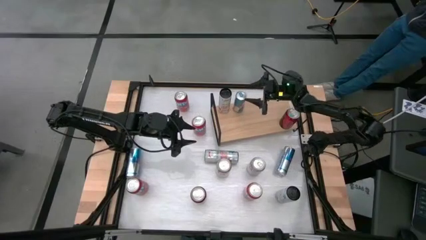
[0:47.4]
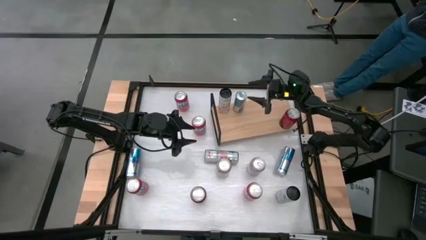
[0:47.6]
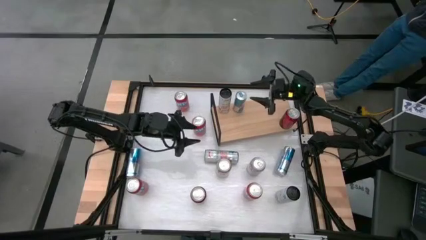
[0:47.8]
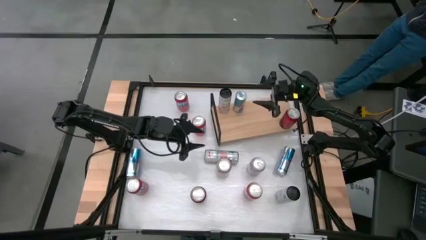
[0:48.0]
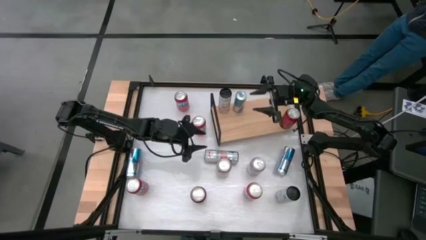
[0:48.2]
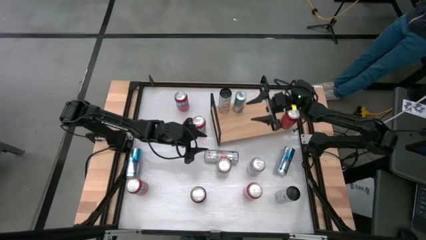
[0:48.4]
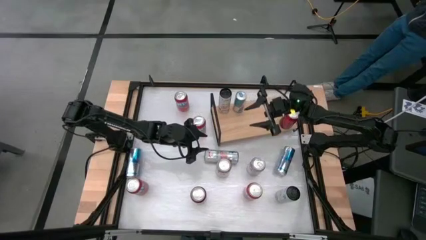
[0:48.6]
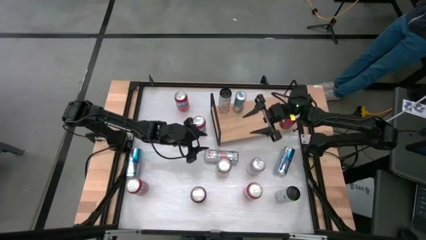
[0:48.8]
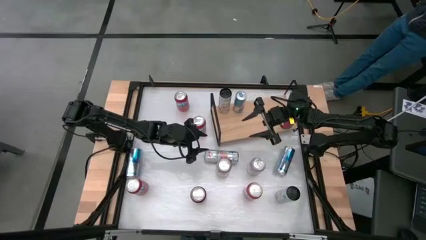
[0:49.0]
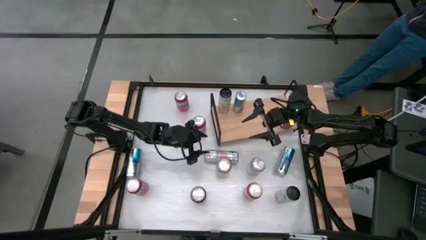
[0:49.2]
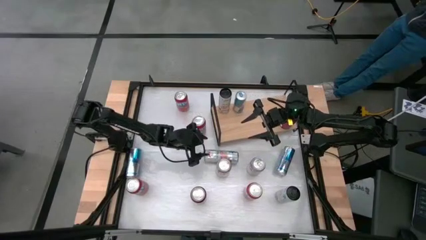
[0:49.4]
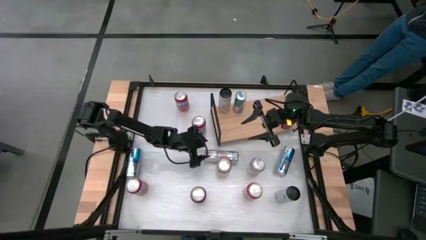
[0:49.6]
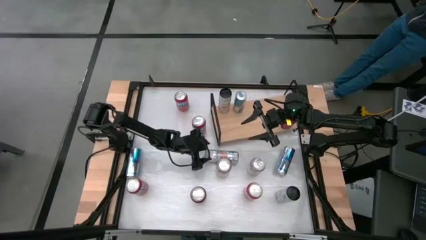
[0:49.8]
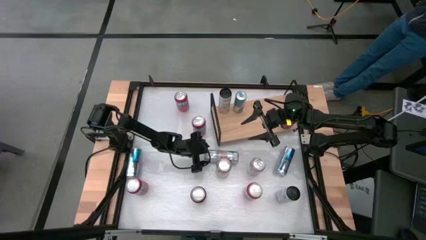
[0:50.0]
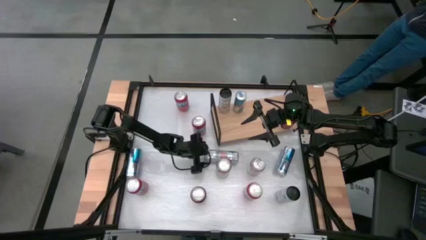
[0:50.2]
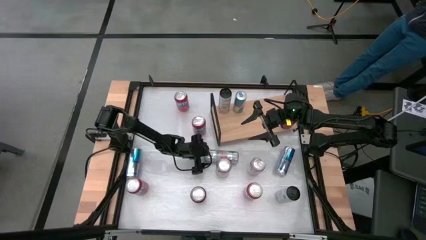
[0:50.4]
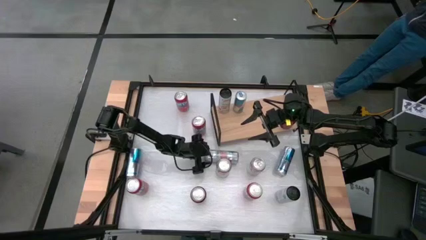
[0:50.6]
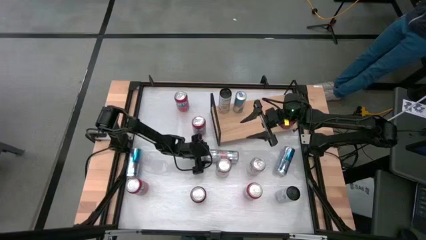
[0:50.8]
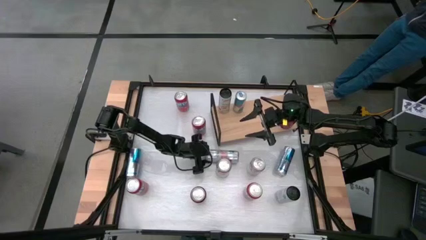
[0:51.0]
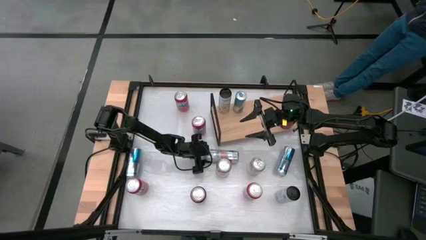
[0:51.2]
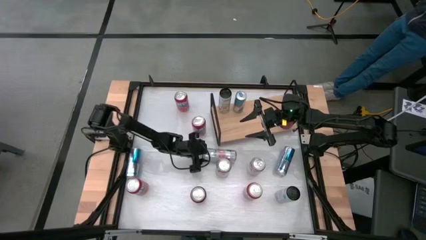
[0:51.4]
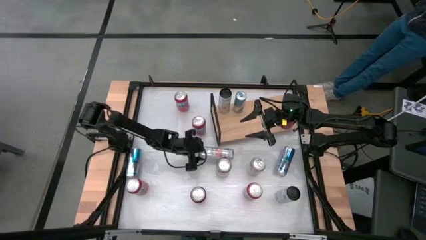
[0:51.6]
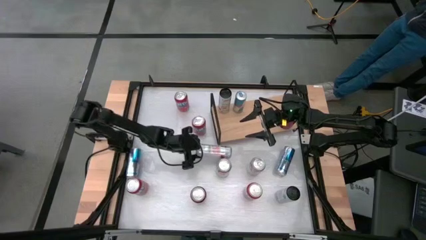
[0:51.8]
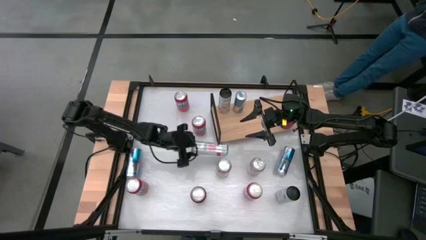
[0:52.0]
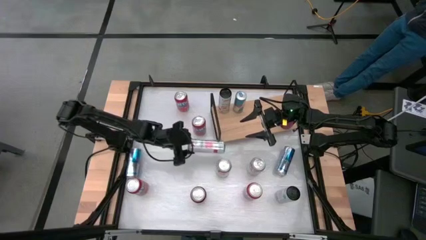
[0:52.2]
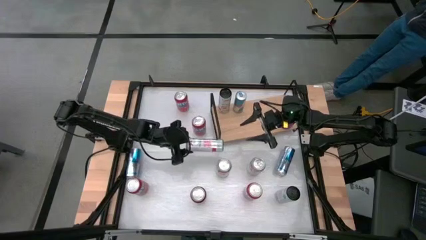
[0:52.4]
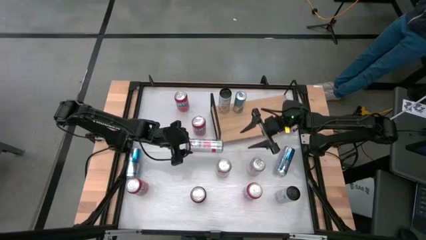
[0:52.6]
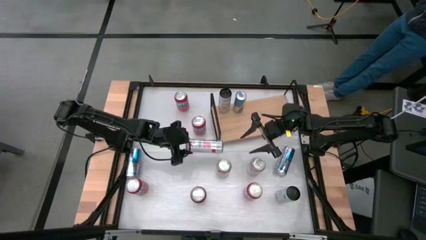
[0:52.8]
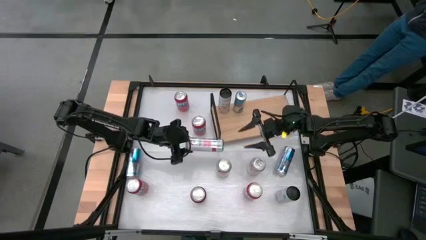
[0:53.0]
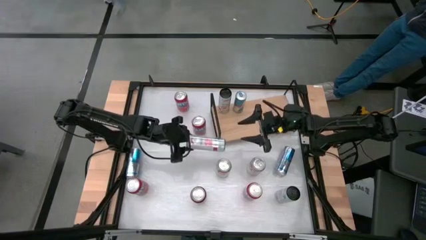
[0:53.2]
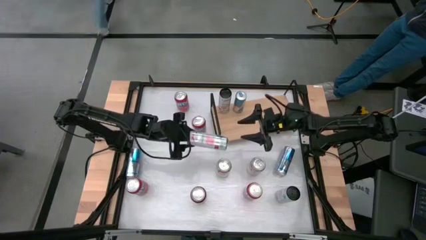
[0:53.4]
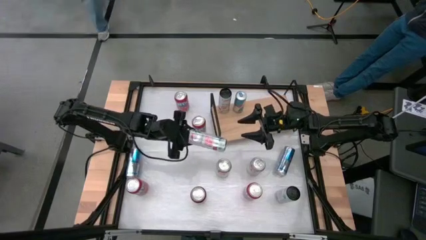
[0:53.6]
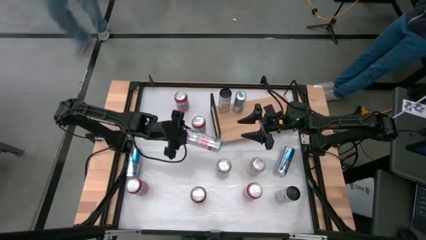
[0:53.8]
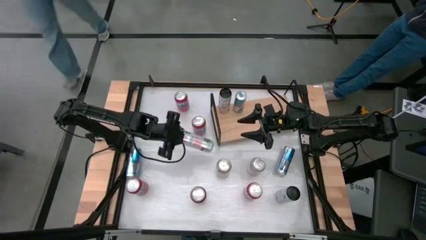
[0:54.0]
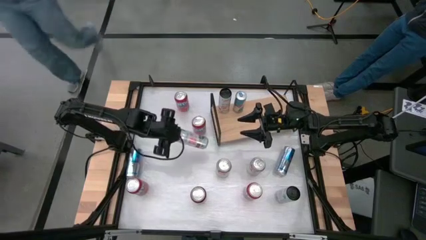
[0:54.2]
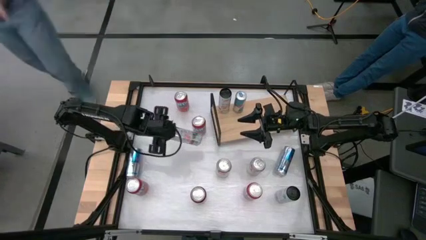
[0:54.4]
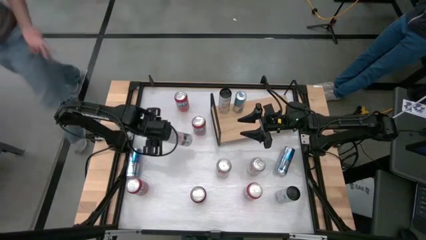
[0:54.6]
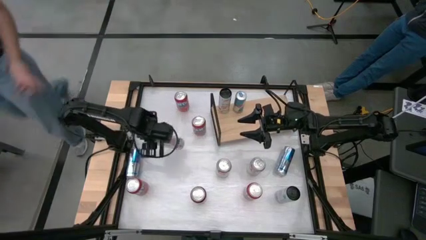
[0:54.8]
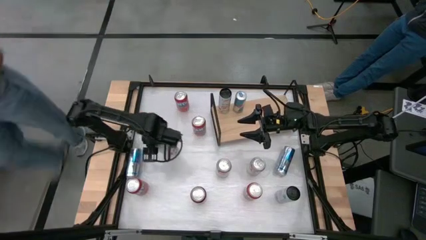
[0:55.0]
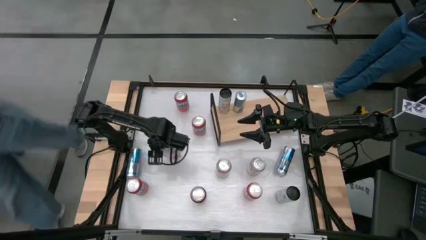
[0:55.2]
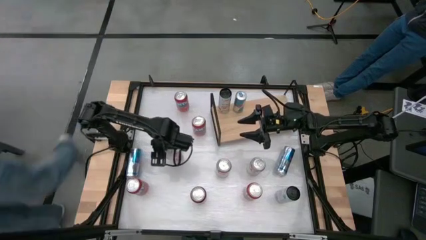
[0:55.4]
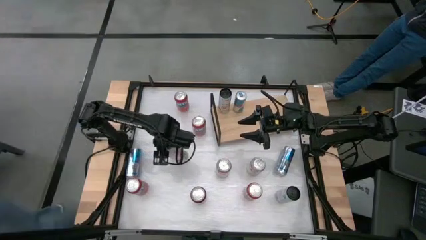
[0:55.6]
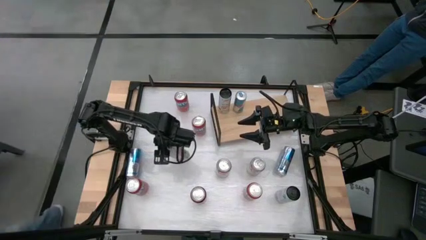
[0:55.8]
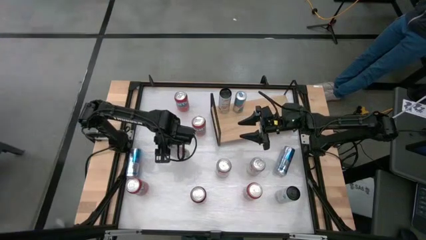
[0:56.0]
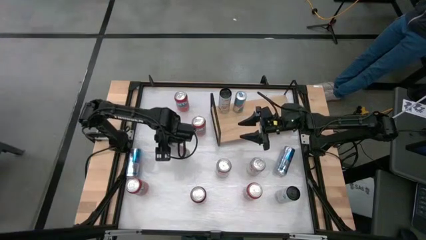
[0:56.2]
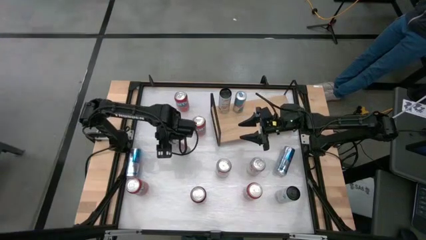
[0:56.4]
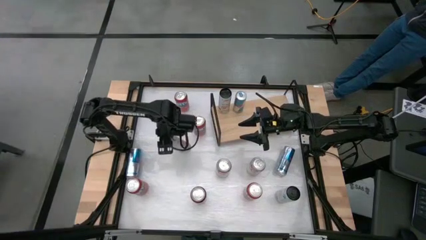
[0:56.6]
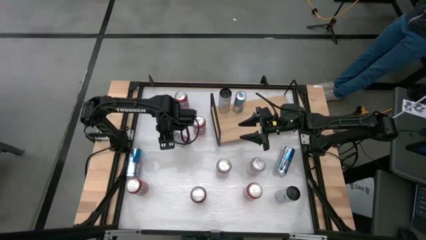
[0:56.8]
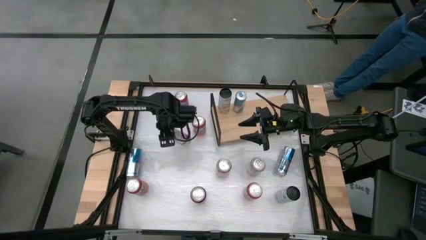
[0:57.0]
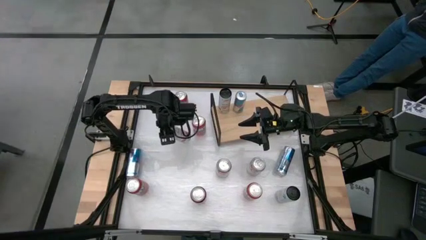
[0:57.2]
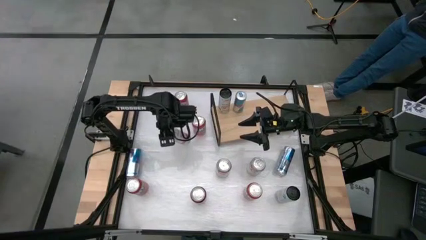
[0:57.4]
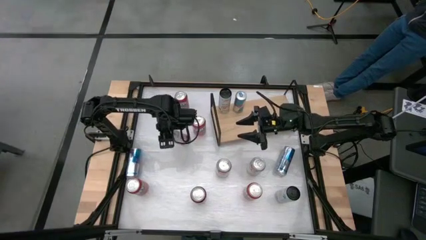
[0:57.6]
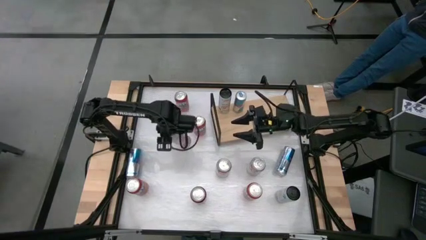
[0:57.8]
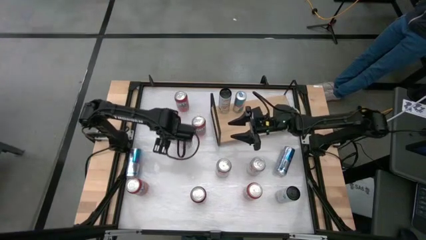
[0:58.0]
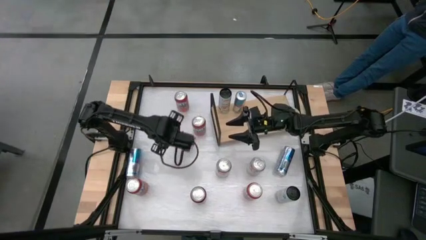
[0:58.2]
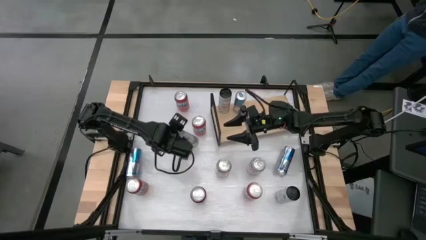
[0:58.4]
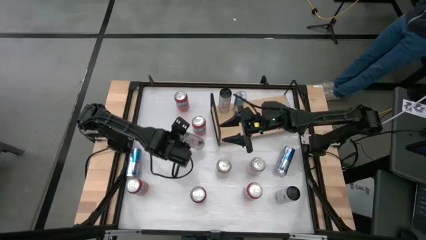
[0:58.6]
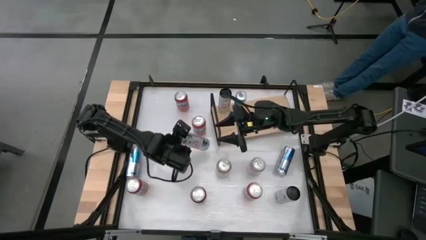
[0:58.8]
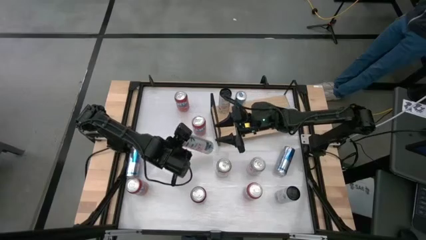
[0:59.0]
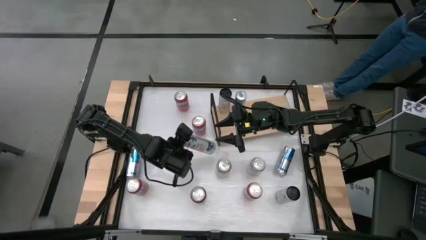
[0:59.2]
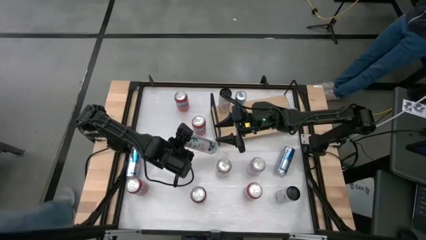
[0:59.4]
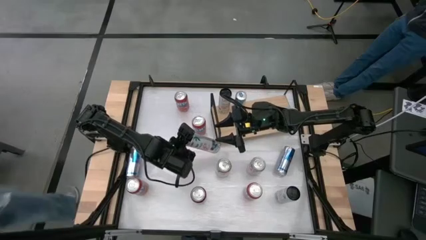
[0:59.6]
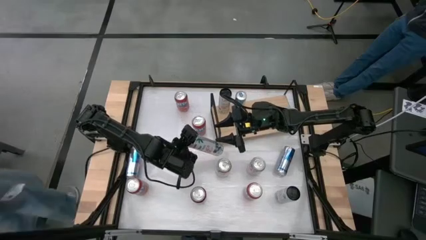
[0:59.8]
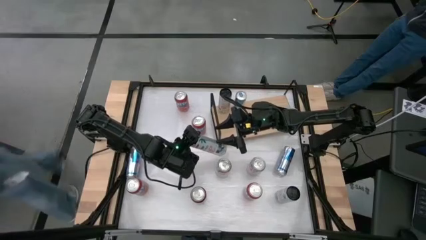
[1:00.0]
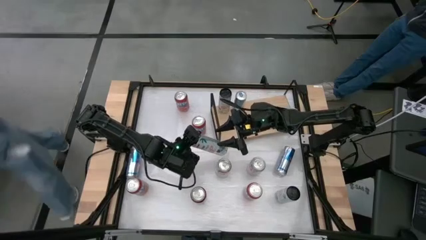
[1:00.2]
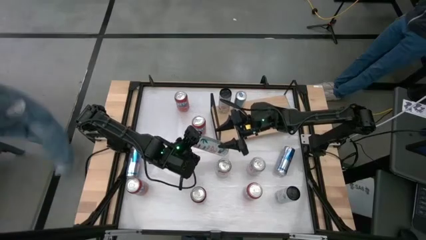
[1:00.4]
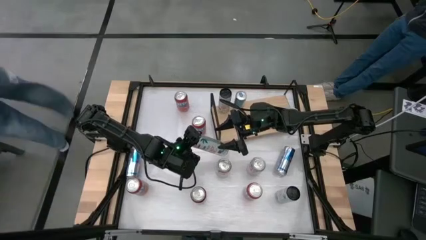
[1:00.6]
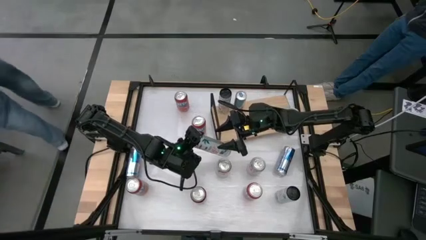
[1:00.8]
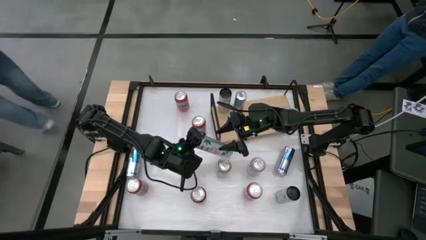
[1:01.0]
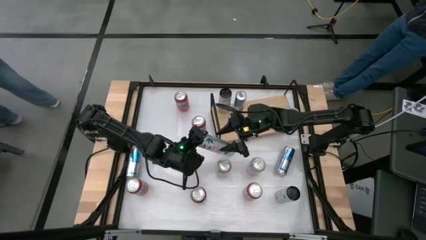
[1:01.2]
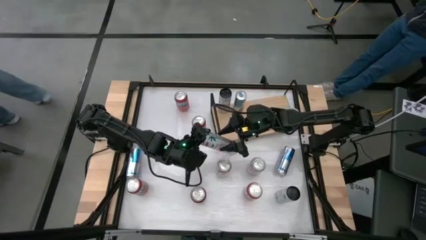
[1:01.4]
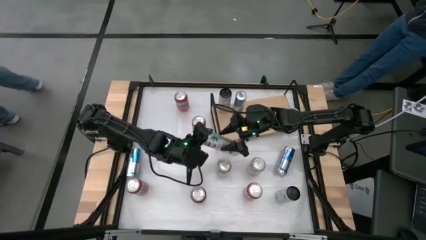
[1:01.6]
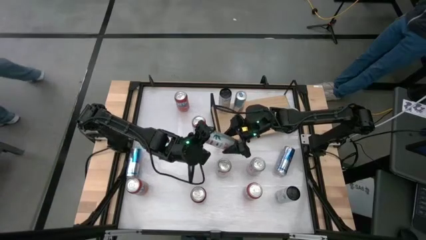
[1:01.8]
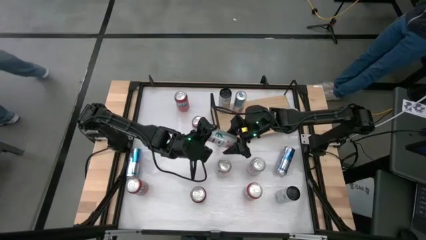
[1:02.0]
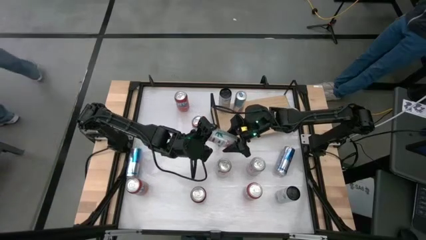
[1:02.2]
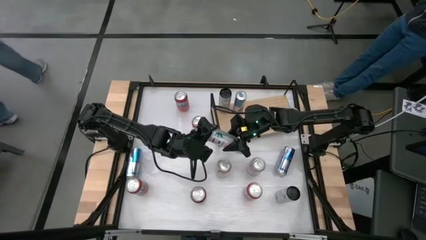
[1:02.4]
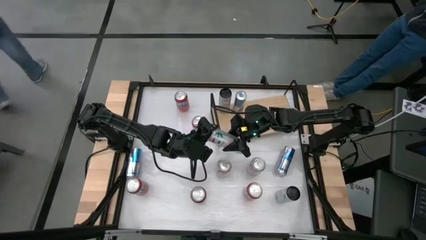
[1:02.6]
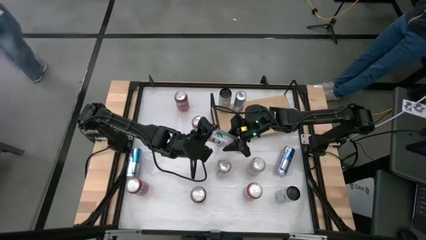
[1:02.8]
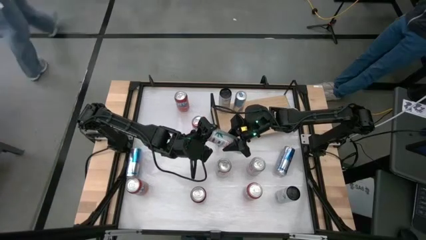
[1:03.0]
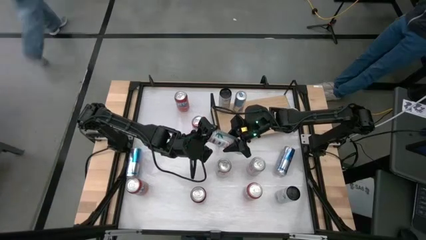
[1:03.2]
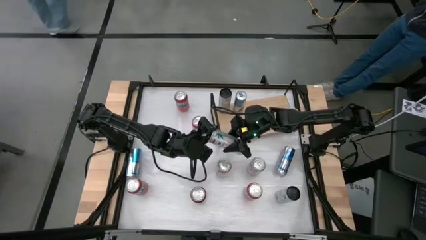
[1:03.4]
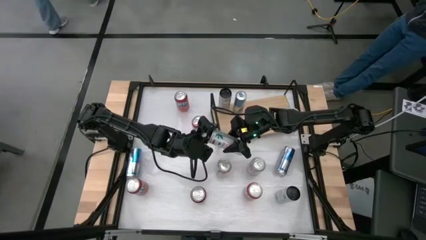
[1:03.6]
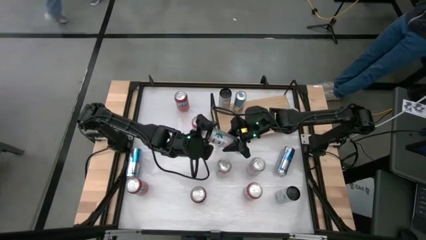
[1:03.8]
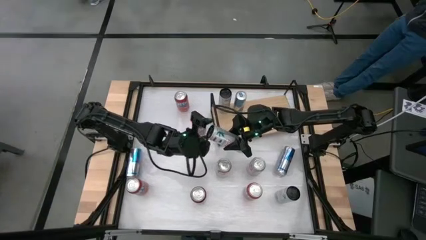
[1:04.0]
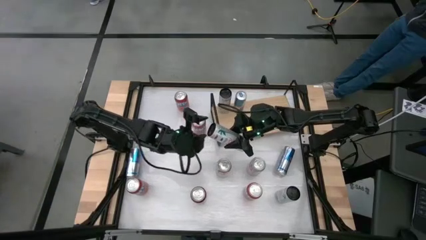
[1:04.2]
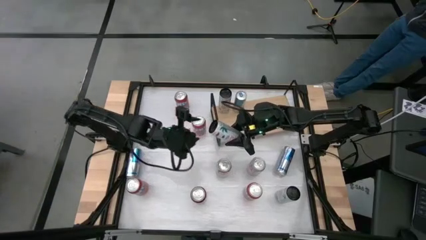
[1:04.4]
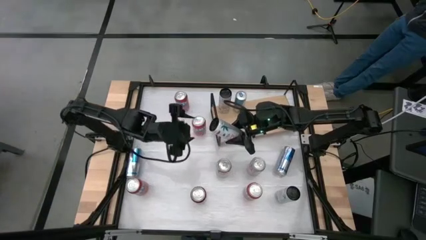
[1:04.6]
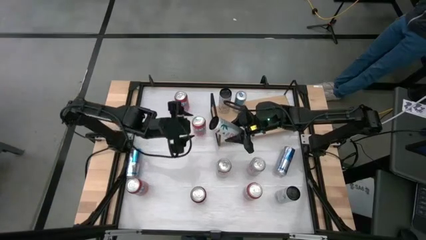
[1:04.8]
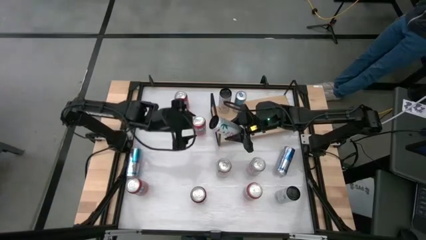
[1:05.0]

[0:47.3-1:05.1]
Task: Place canned beverage on shelf
Put the top white black soda can on the shelf aligned with the other white black soda can
